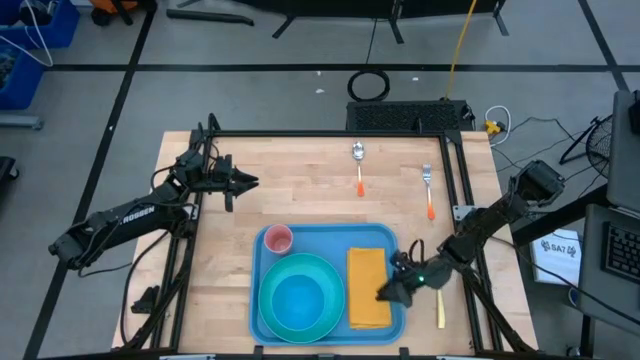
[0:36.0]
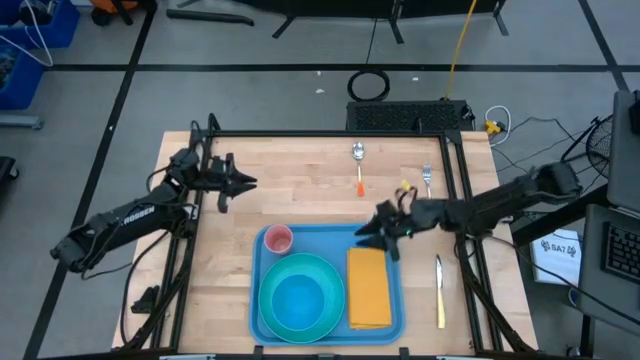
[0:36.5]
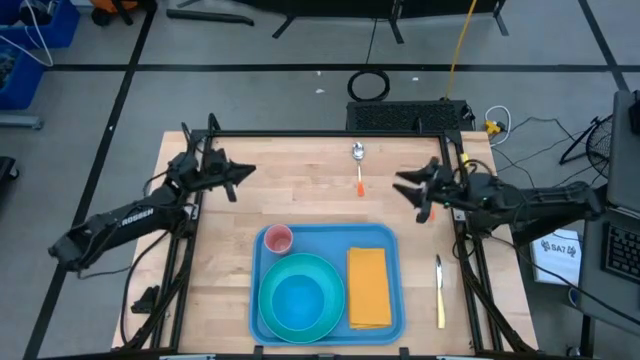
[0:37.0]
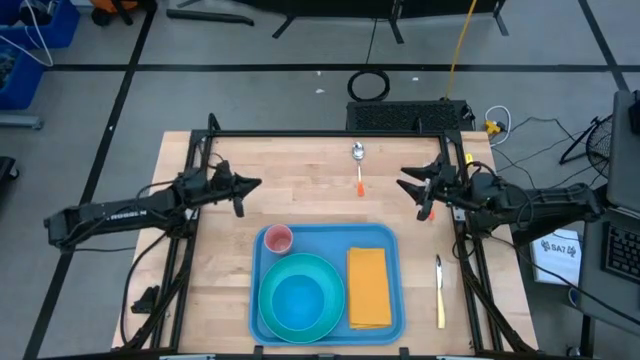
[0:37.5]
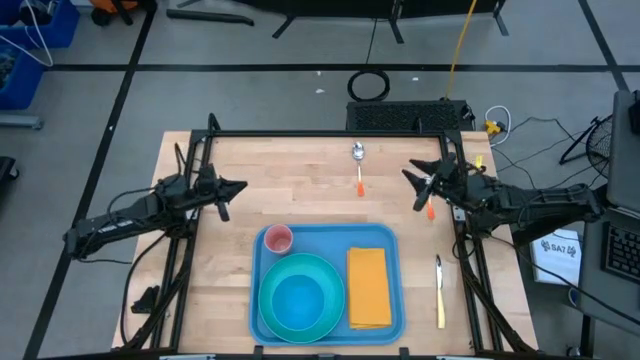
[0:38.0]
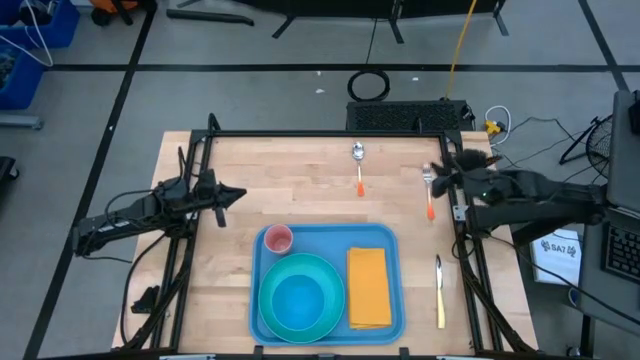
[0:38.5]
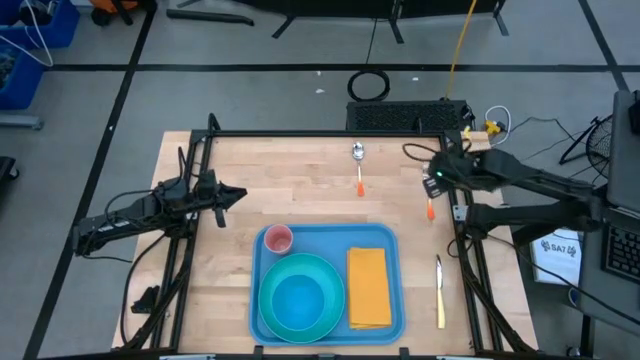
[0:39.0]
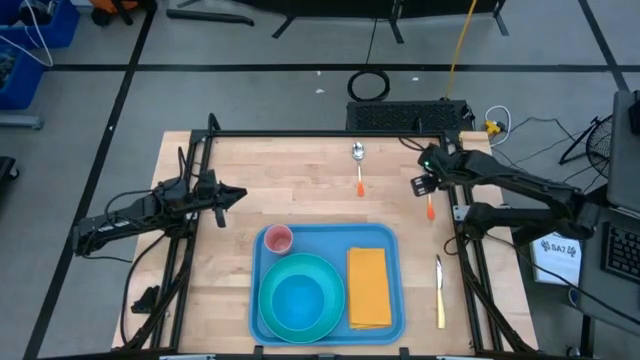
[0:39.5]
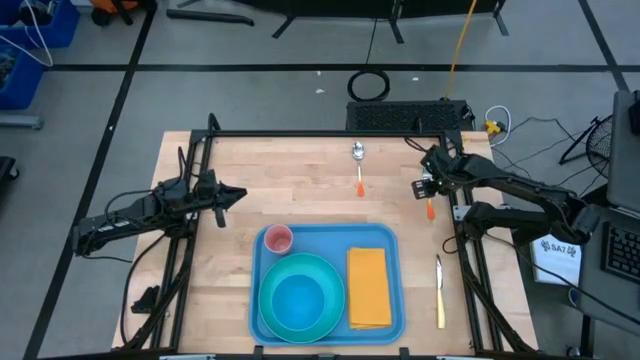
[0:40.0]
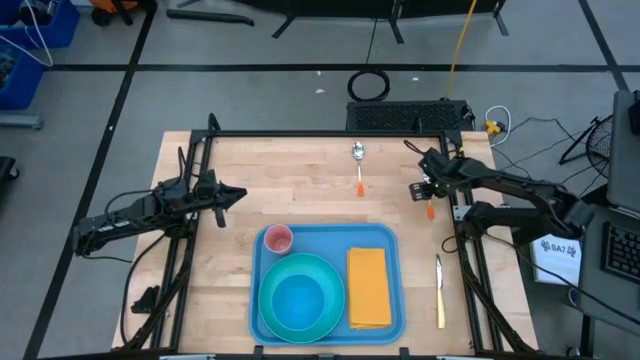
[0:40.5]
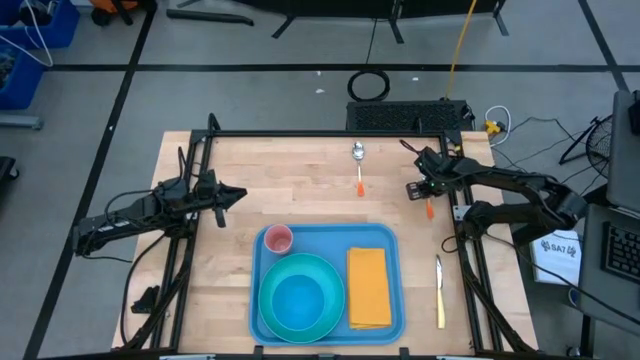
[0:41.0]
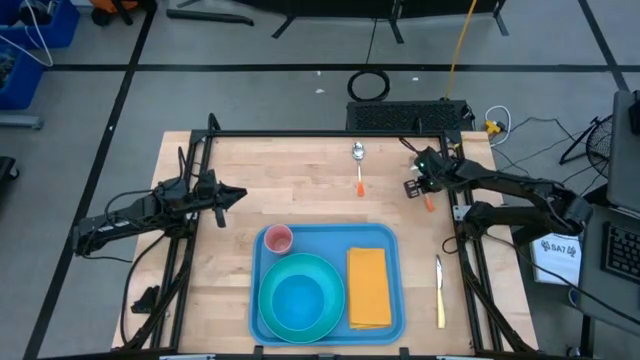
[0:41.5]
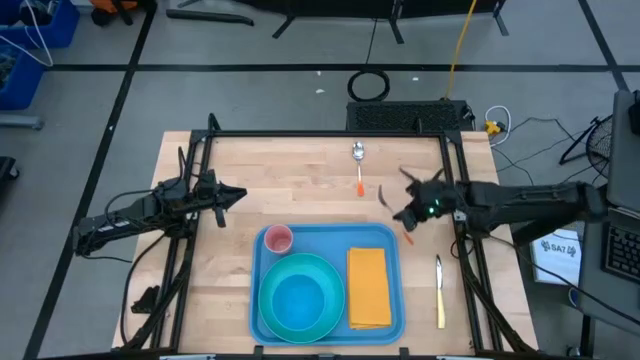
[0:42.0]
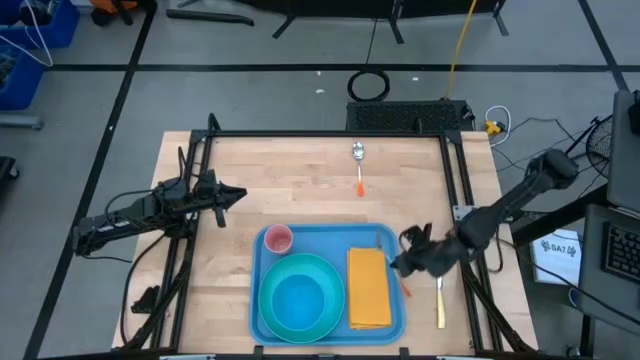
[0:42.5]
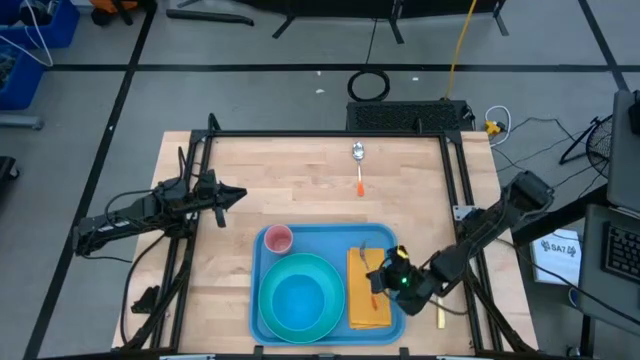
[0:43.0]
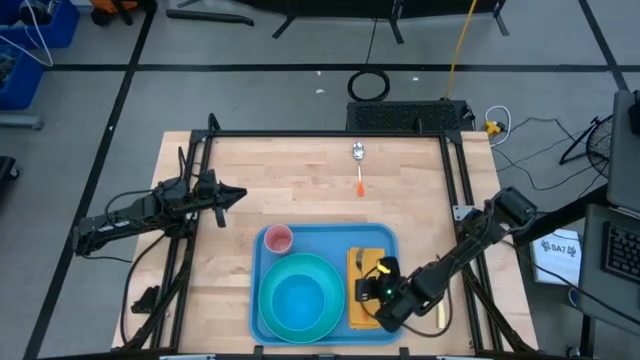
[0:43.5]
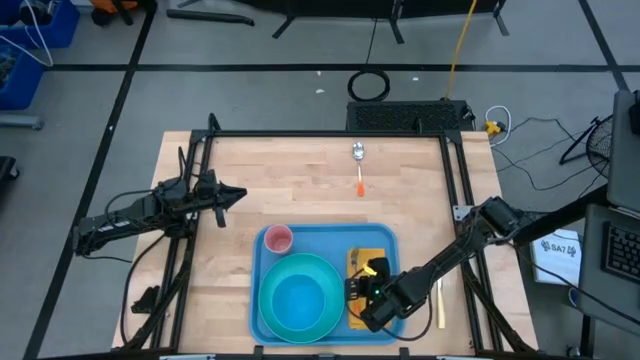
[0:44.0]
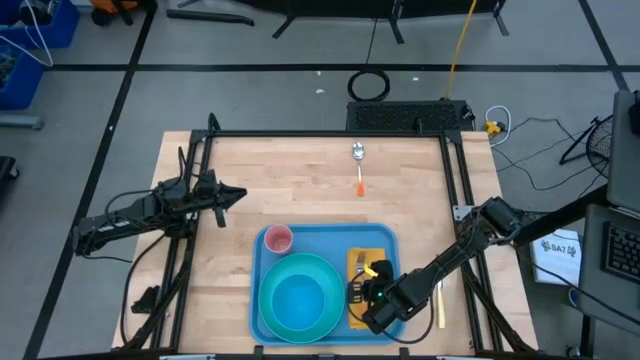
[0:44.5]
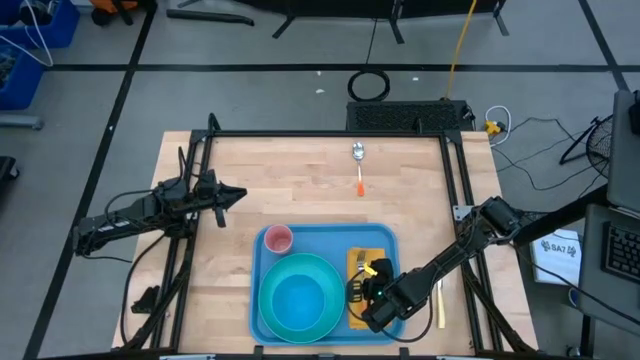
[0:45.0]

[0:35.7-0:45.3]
Task: Set up tray
Put the orange fork on the yellow napkin

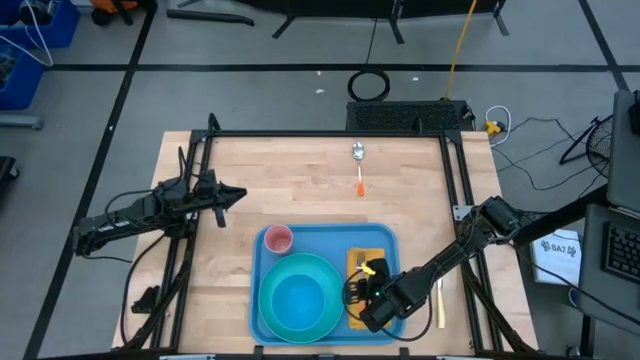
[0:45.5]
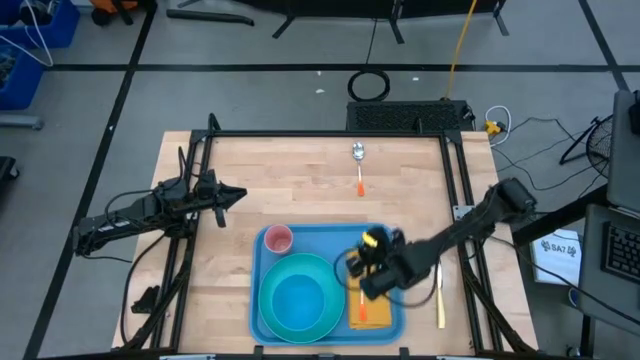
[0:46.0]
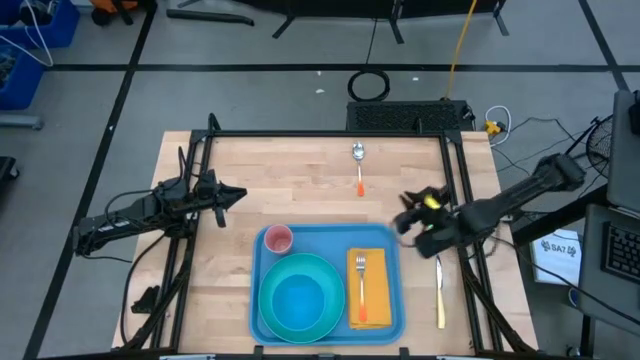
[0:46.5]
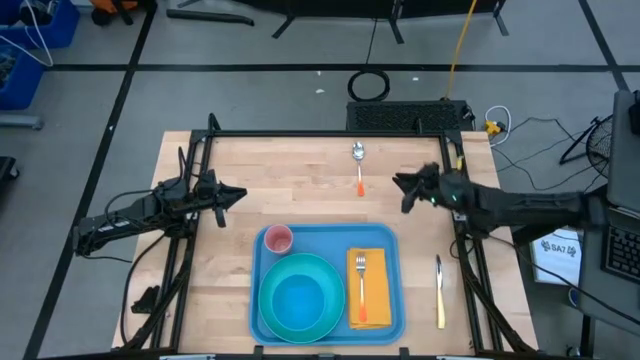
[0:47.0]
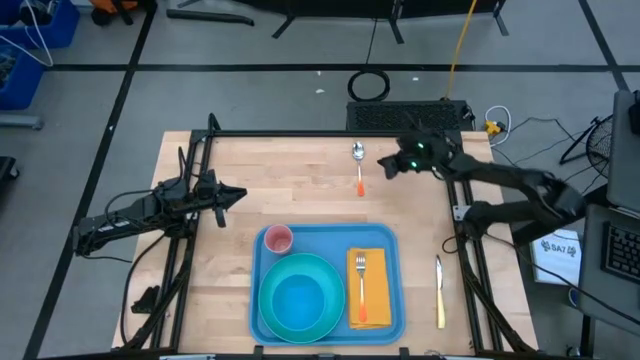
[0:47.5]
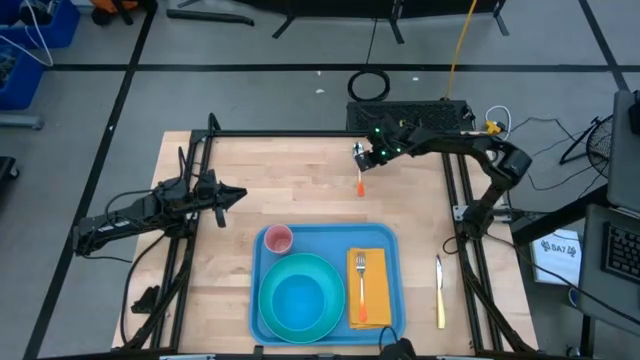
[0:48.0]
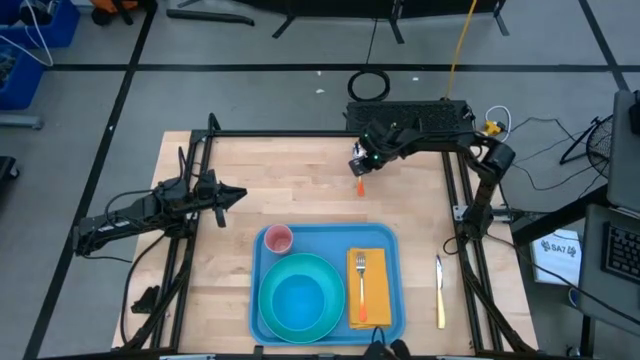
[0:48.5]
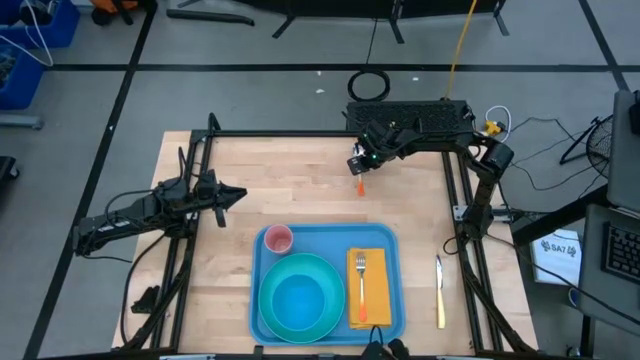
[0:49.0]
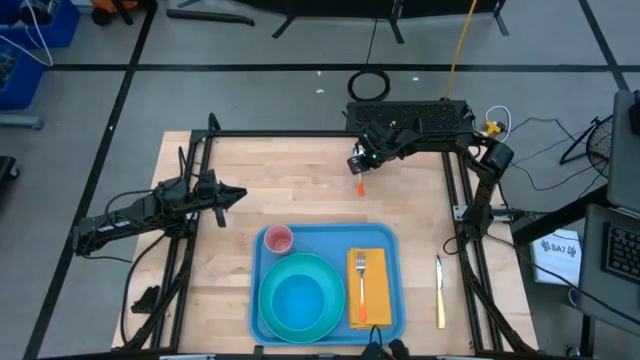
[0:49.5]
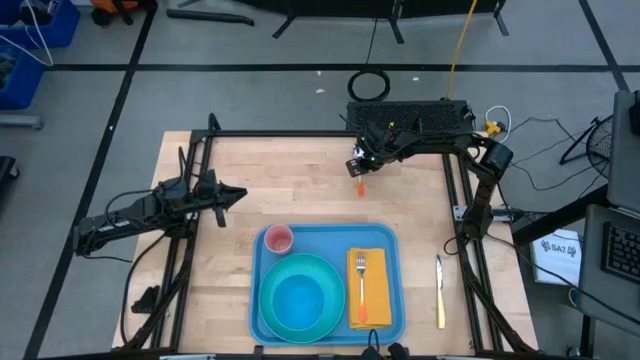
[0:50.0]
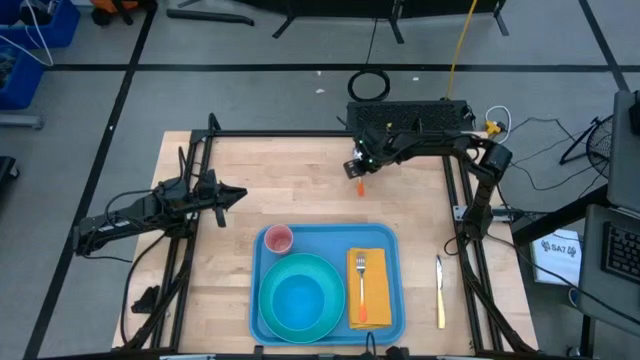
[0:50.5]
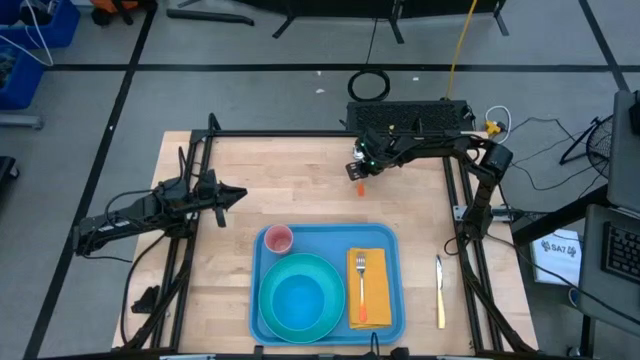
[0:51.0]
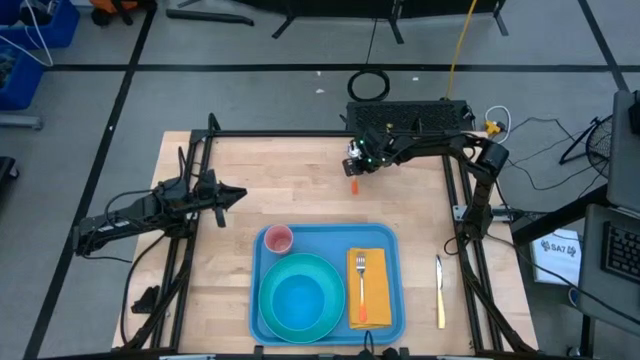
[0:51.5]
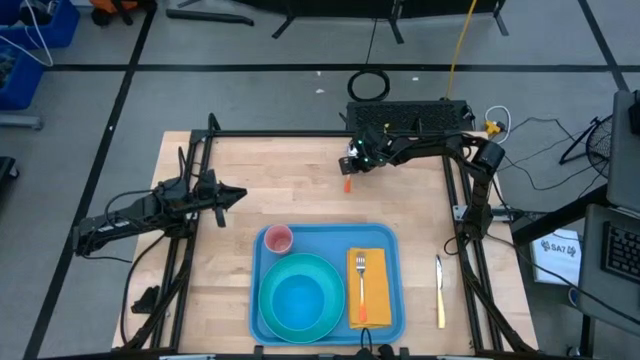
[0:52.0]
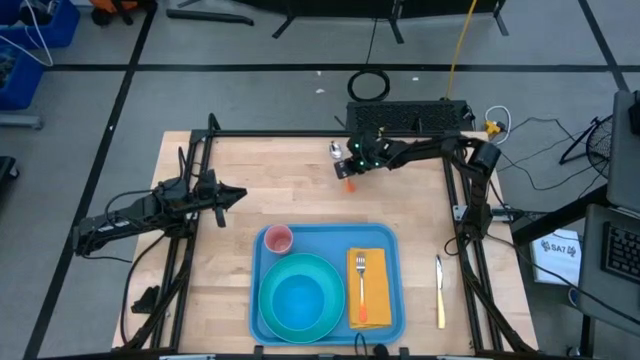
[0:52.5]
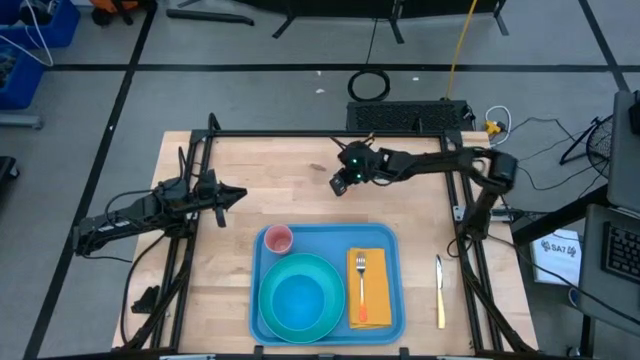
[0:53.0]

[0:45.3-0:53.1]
Put the orange spoon on the yellow napkin to the right of the orange fork

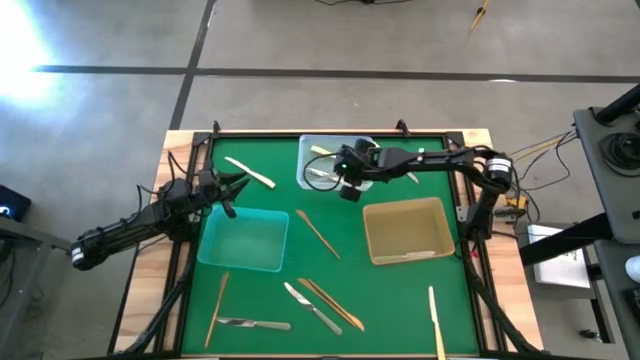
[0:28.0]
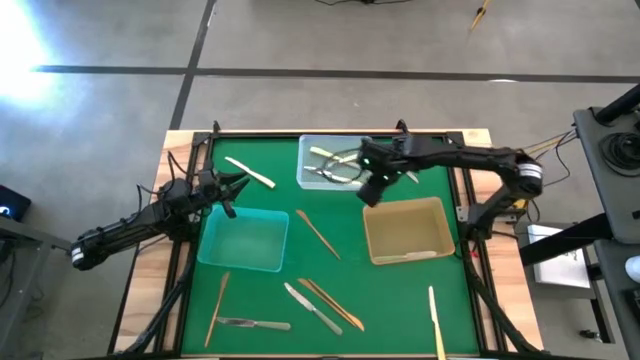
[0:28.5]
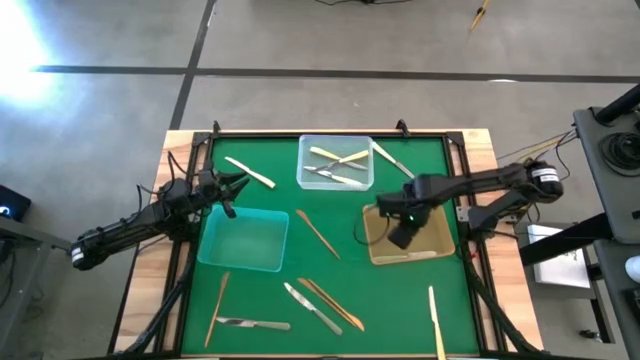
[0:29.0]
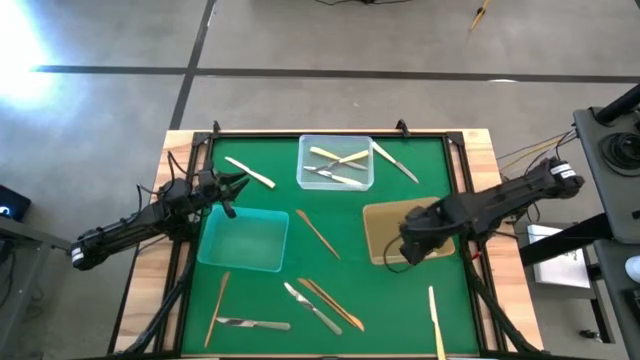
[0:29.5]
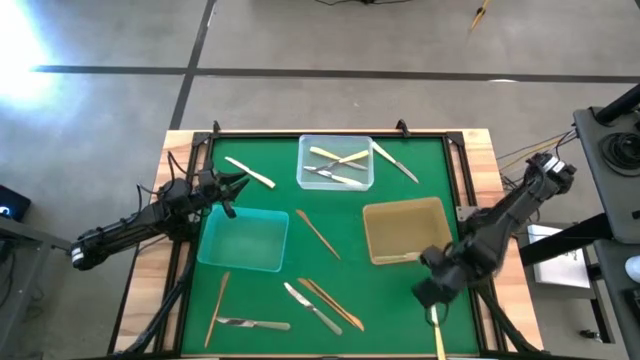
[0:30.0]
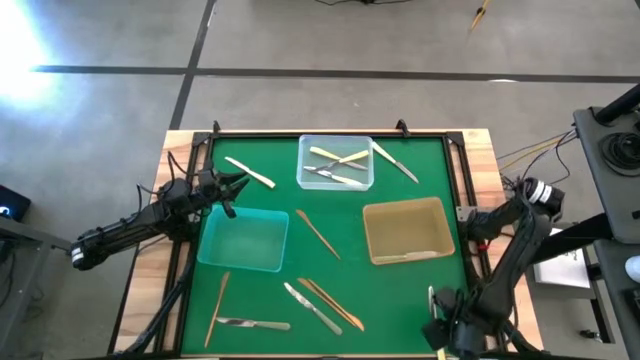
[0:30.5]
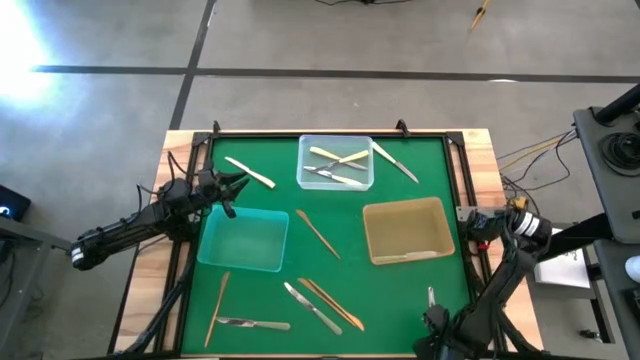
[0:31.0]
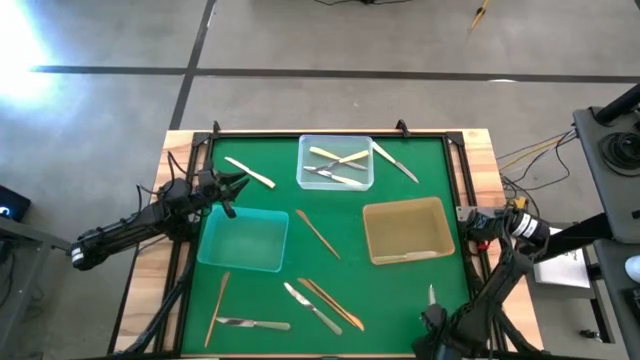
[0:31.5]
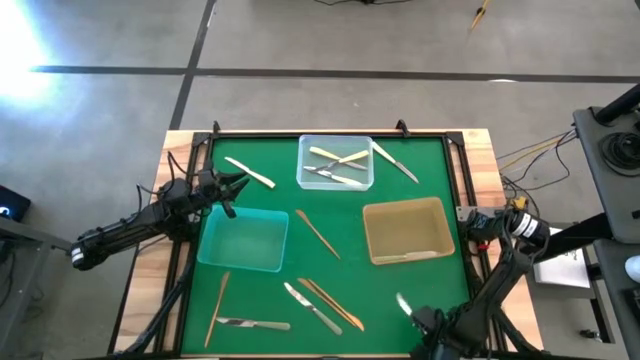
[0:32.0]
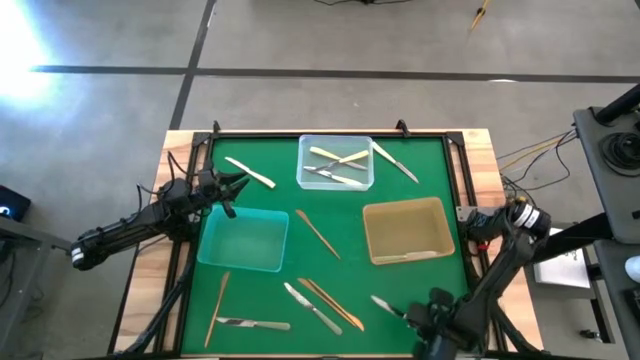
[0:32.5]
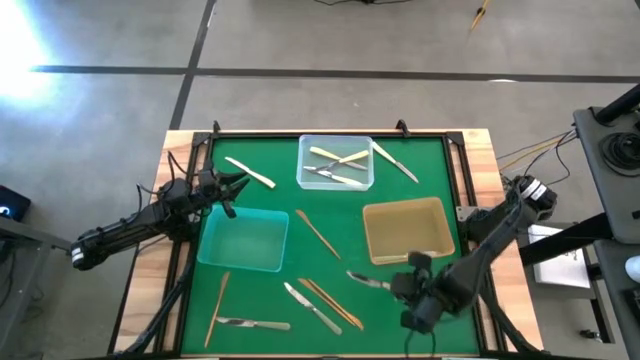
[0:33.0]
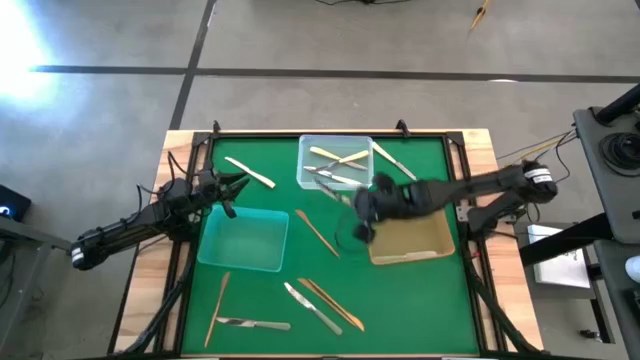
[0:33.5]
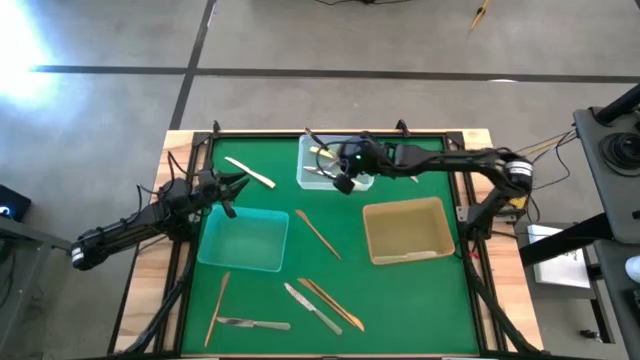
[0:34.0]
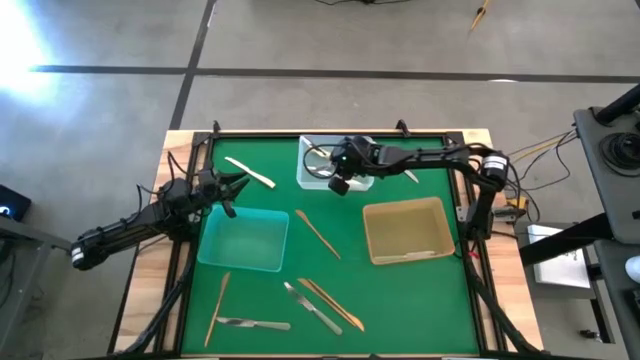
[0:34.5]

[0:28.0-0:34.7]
Task: Sort silverware by color (type)
Put the yellow knife into the transparent bin
